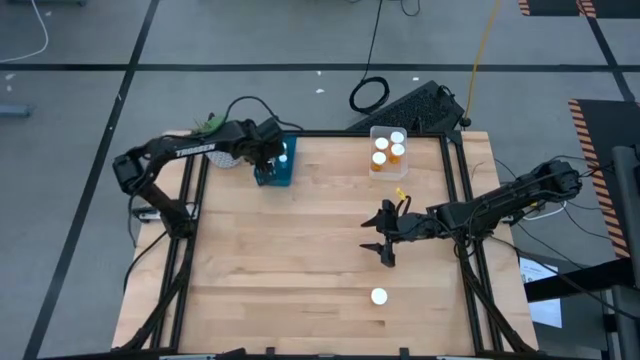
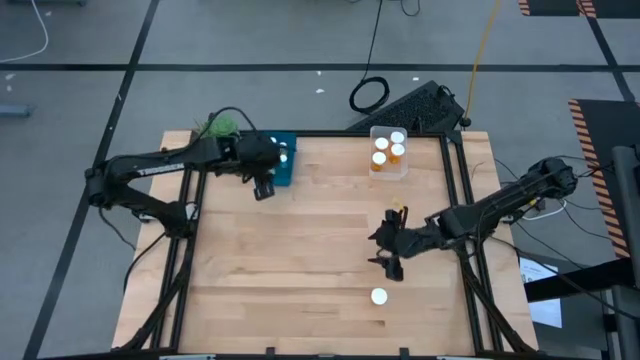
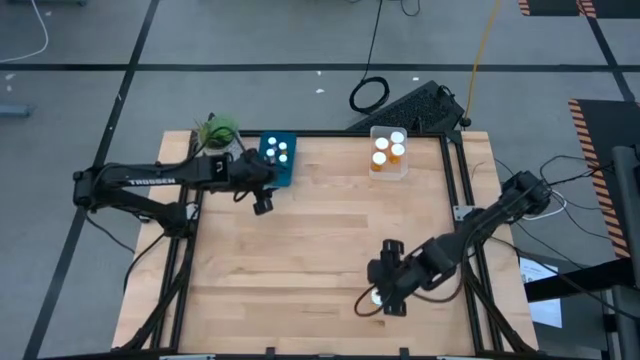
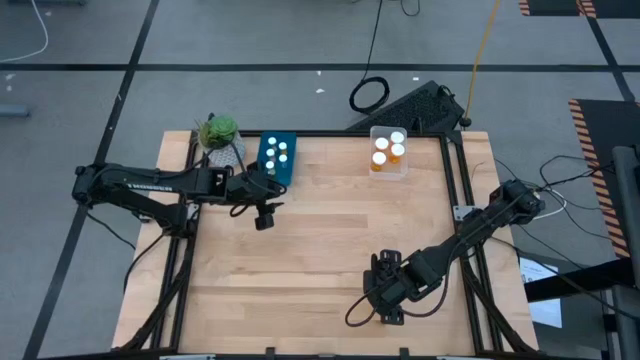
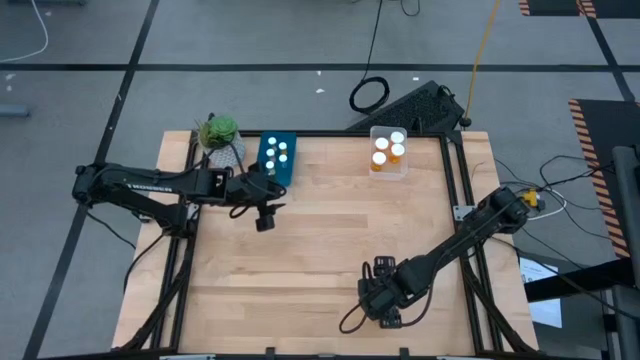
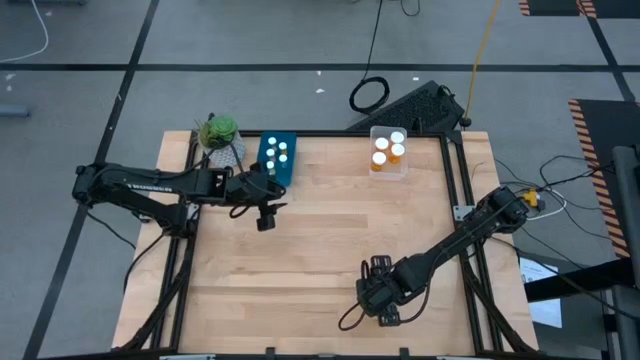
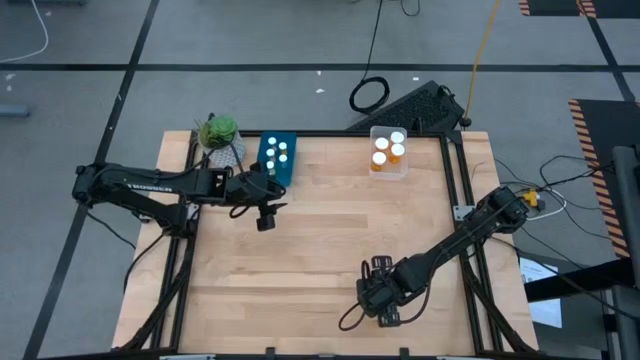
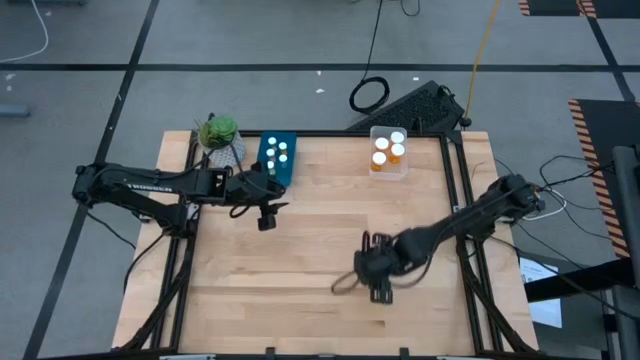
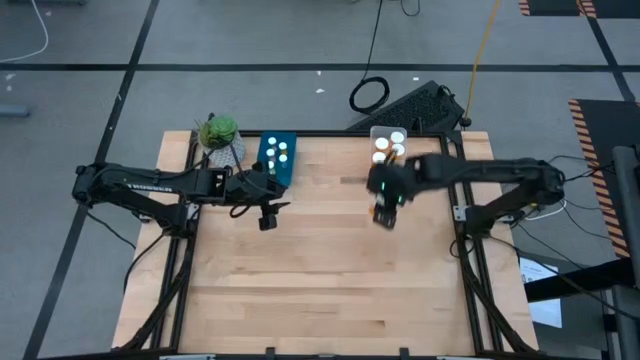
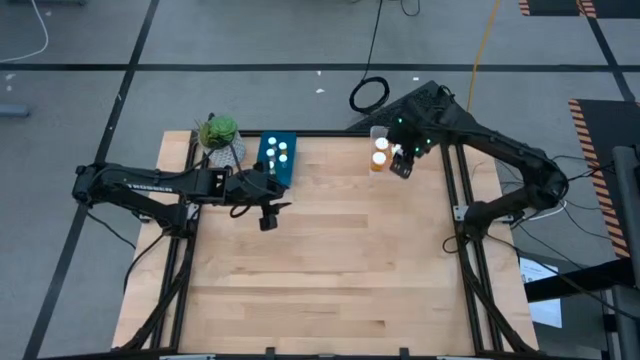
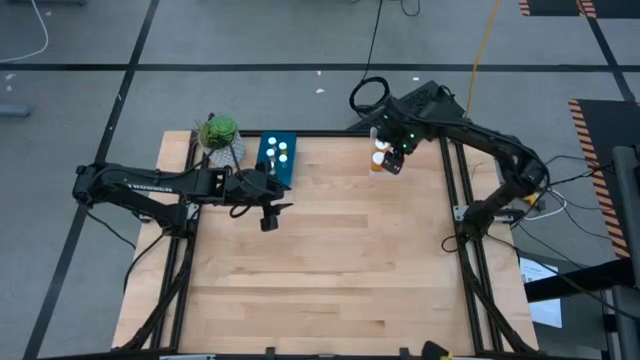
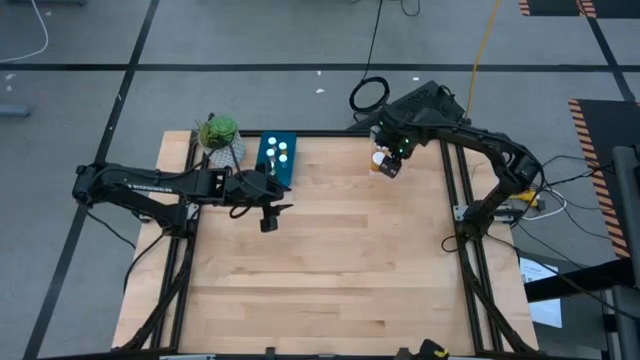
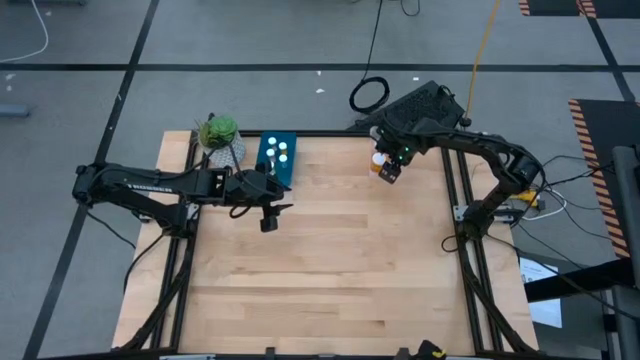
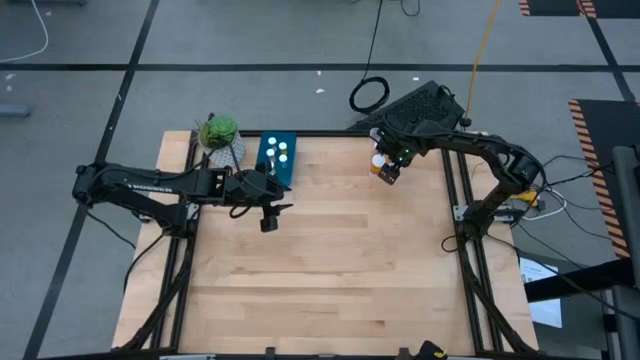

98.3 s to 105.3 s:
Task: Pick and place medicine bottles into bin by pill shape (circle, oval)
Put the orange bottled capsules into the transparent bin

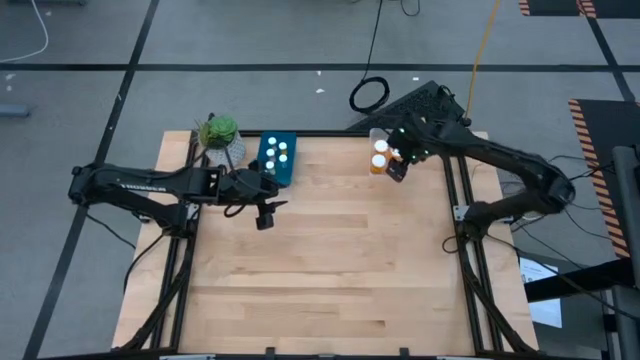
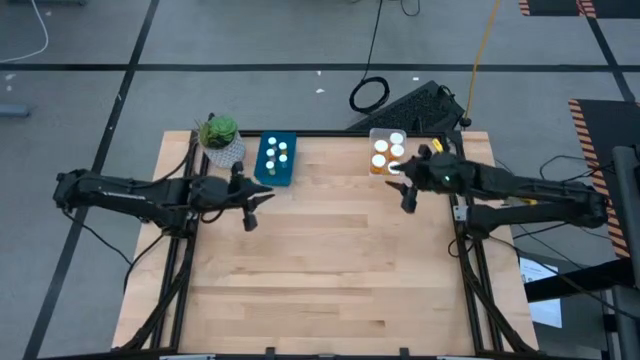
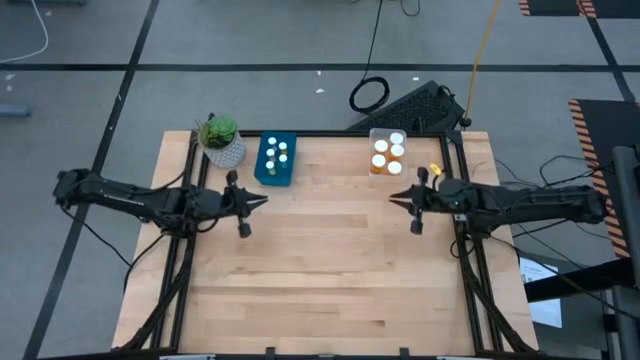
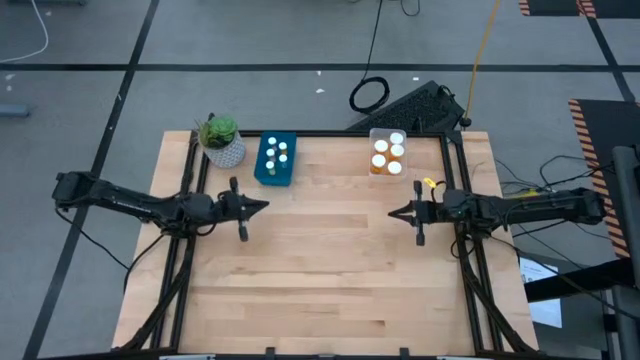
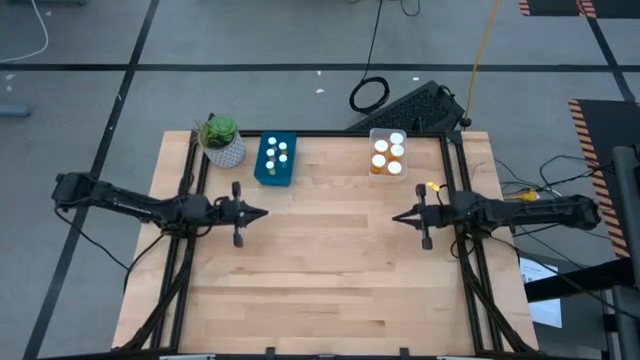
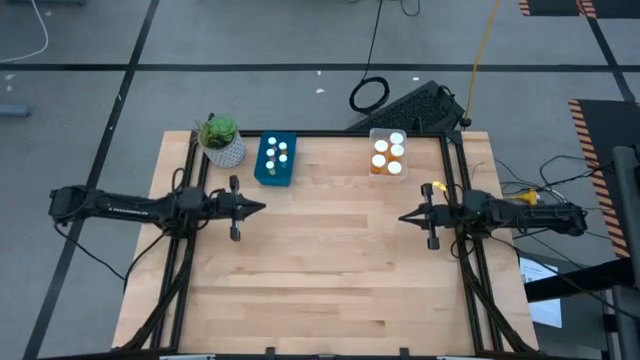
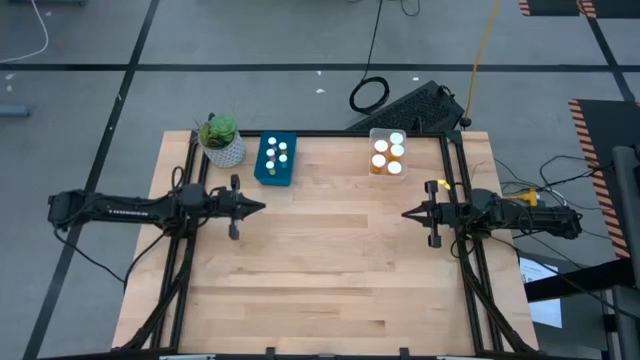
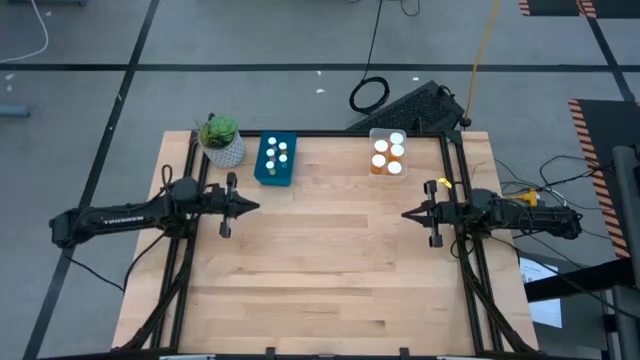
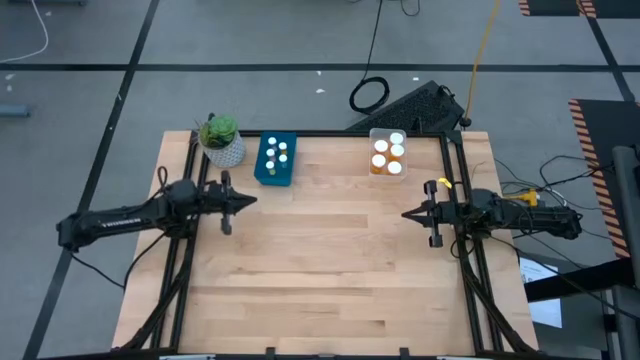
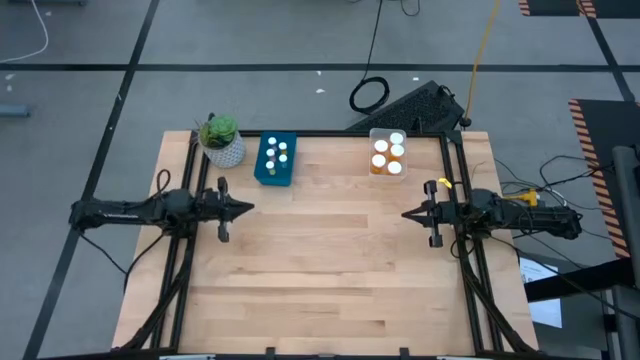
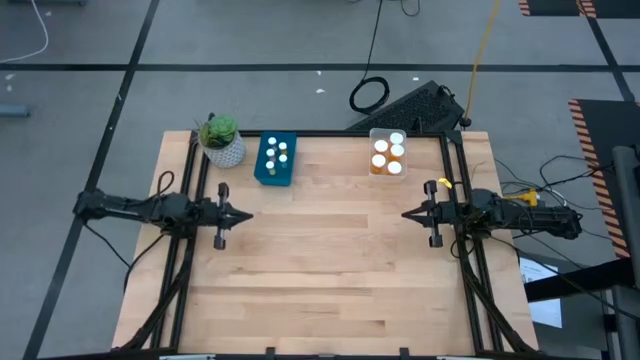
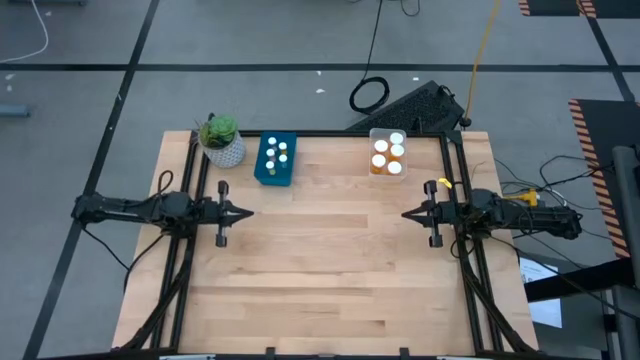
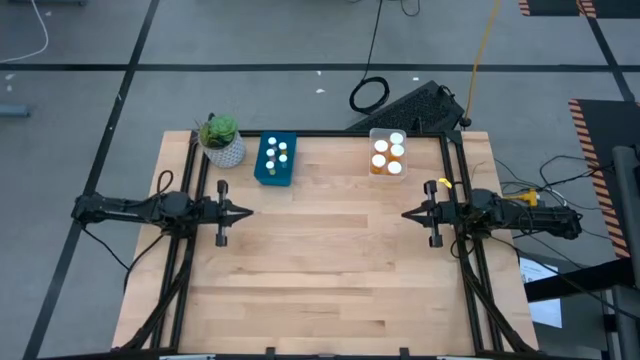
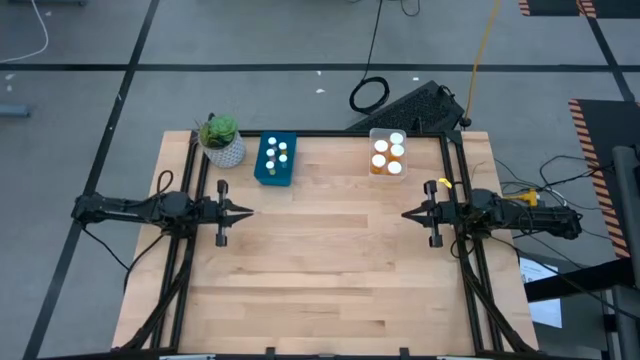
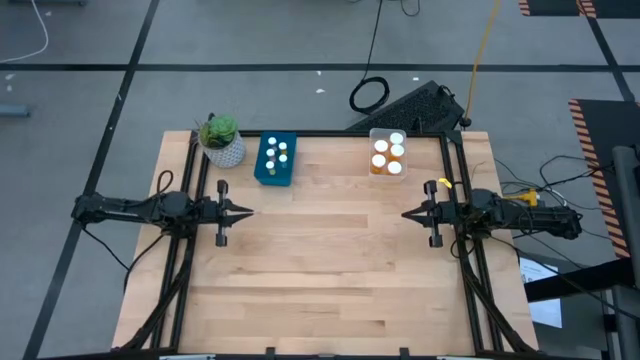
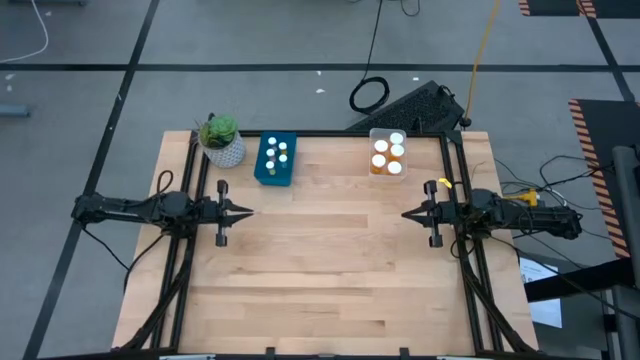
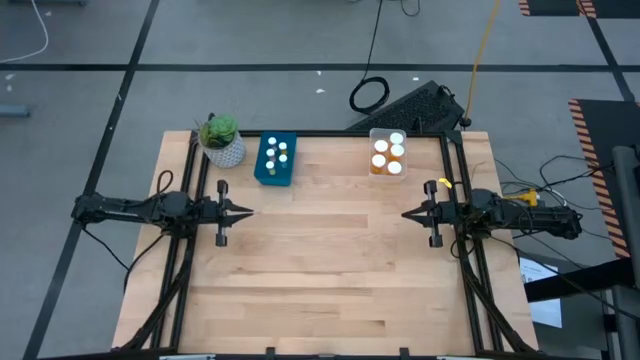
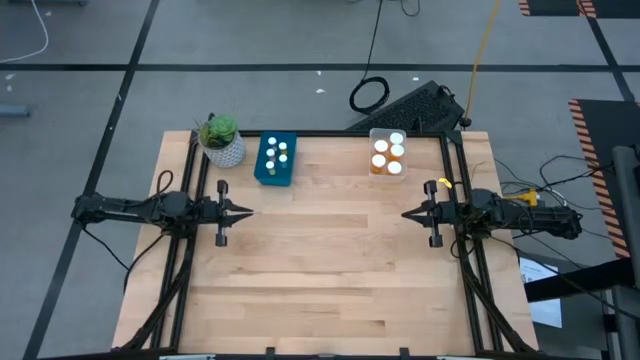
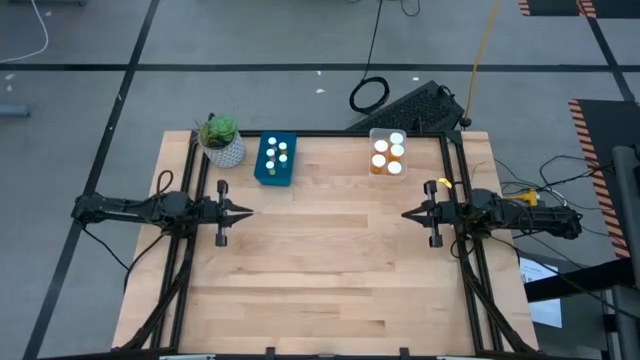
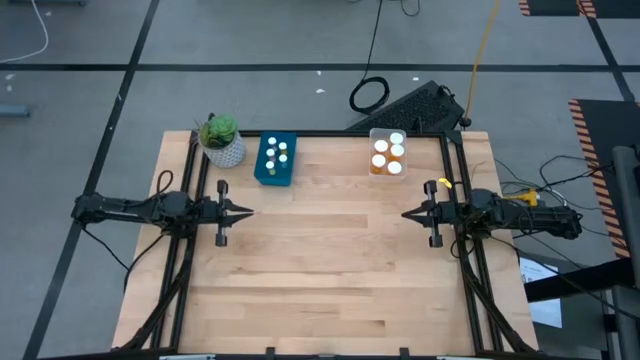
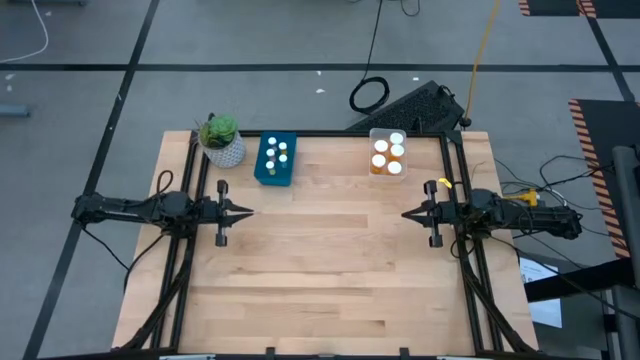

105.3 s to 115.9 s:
Return To Home Position
